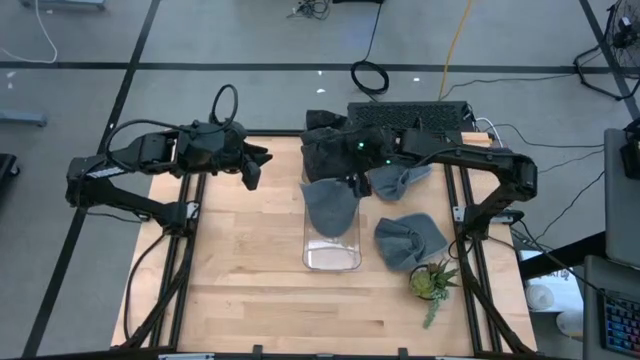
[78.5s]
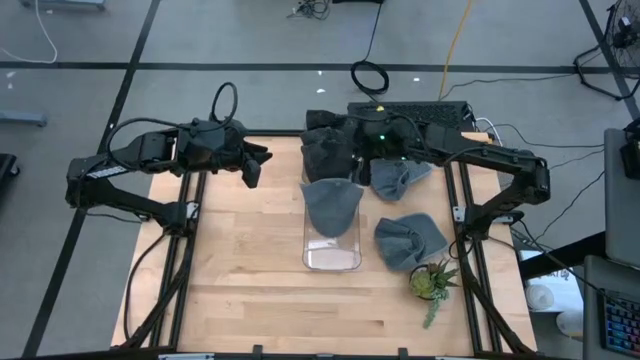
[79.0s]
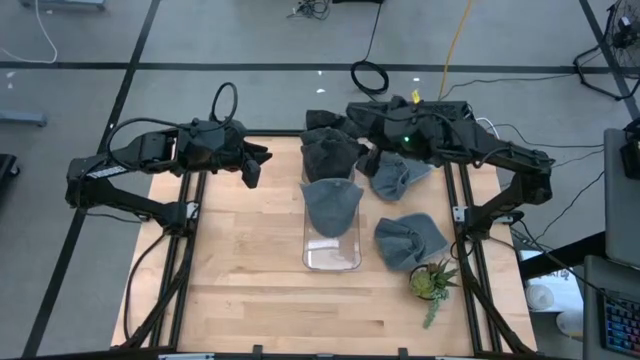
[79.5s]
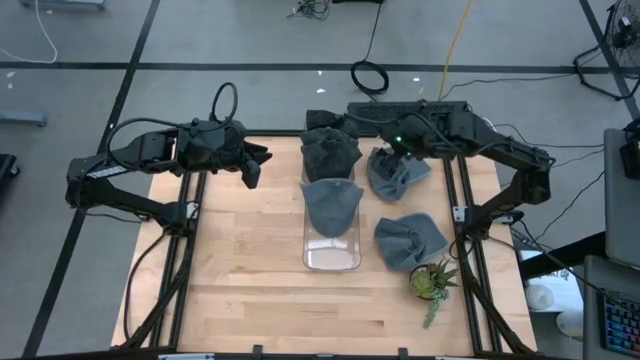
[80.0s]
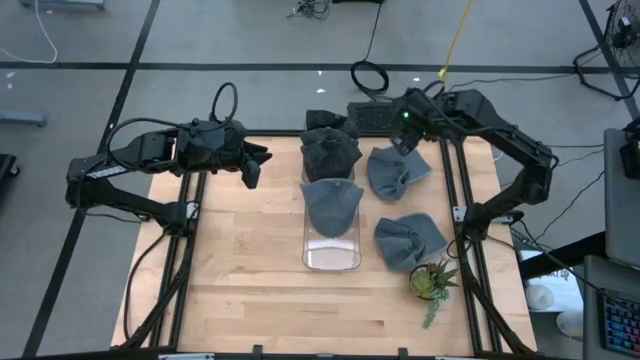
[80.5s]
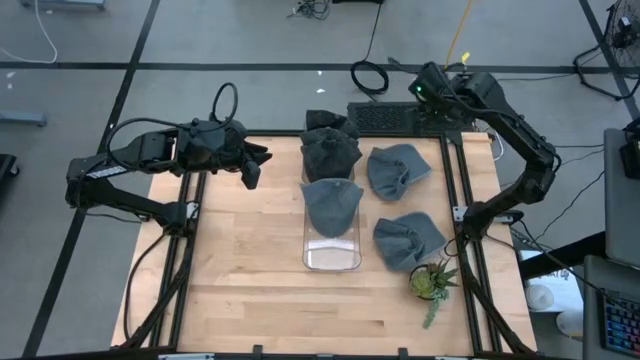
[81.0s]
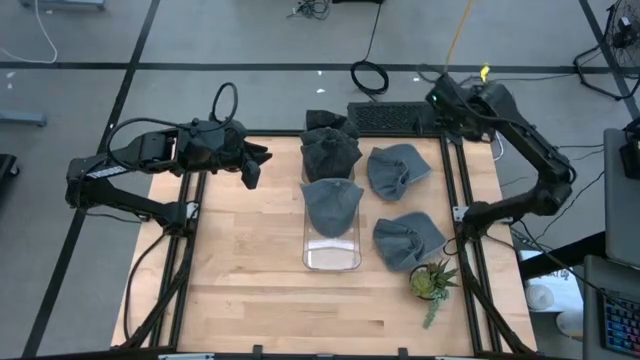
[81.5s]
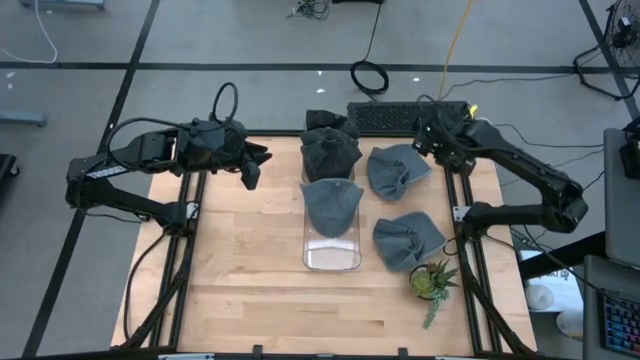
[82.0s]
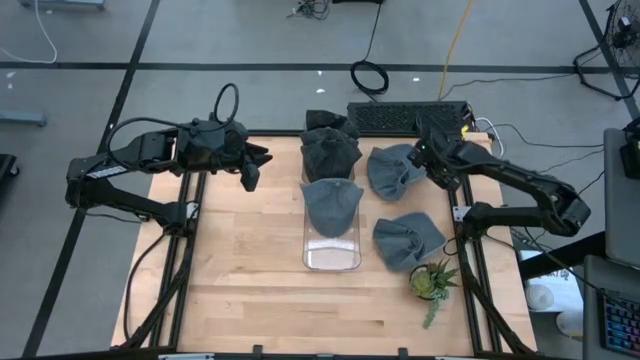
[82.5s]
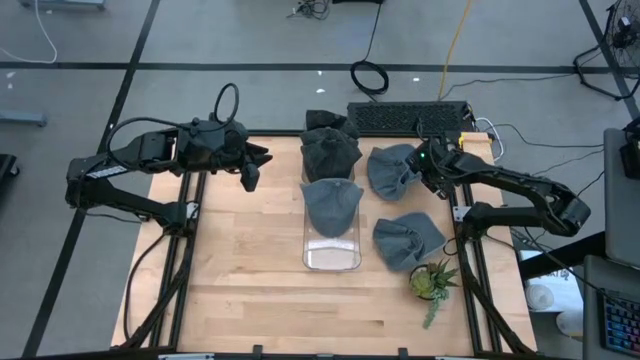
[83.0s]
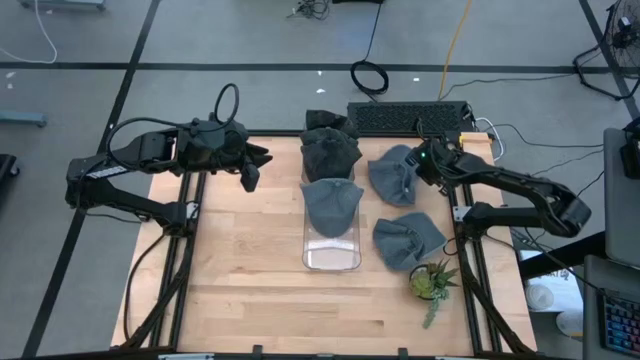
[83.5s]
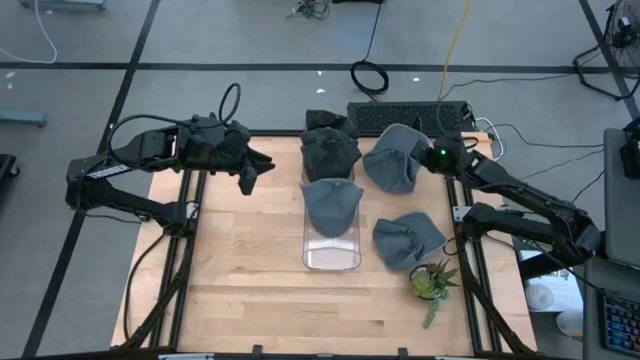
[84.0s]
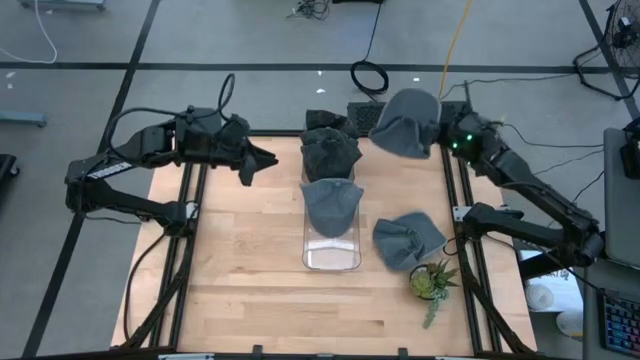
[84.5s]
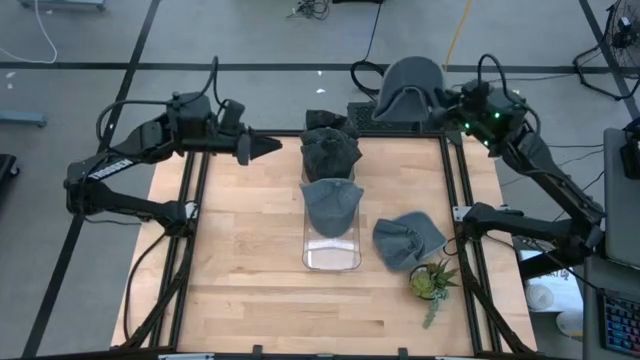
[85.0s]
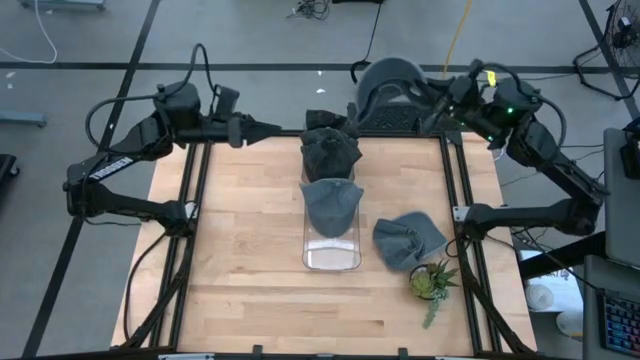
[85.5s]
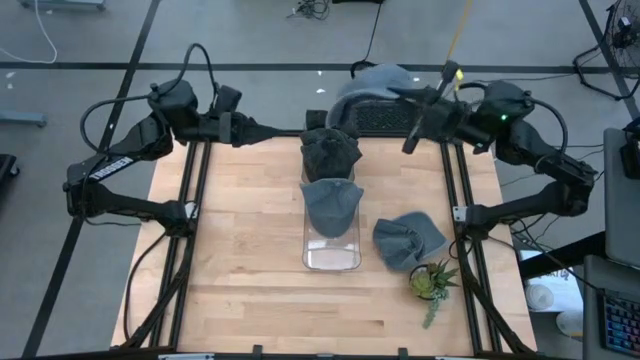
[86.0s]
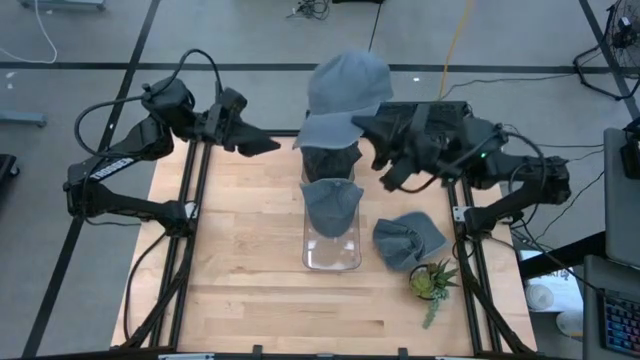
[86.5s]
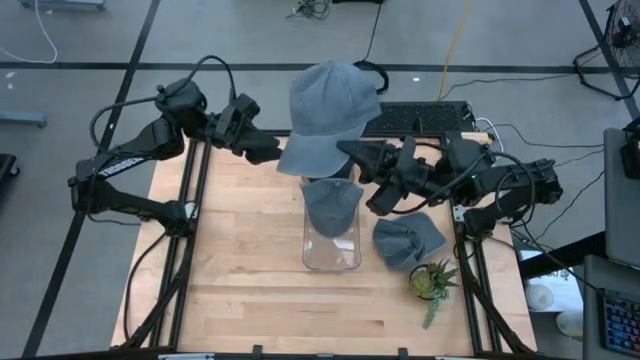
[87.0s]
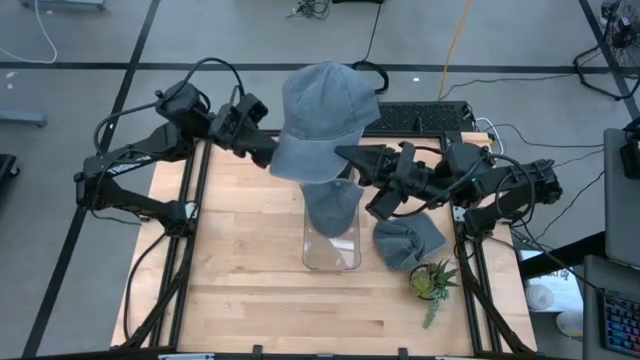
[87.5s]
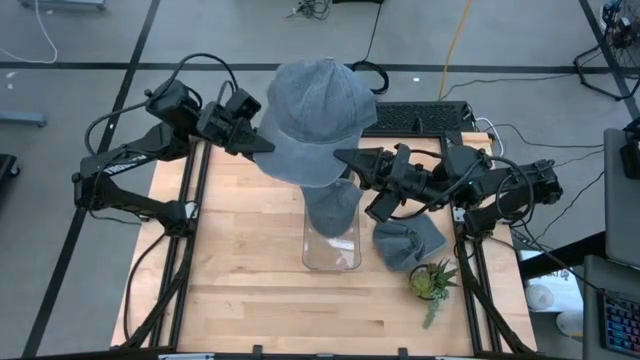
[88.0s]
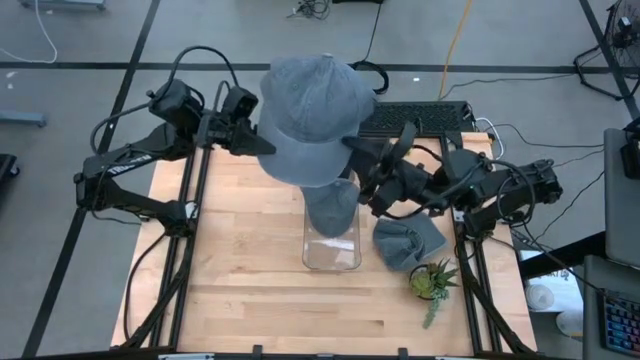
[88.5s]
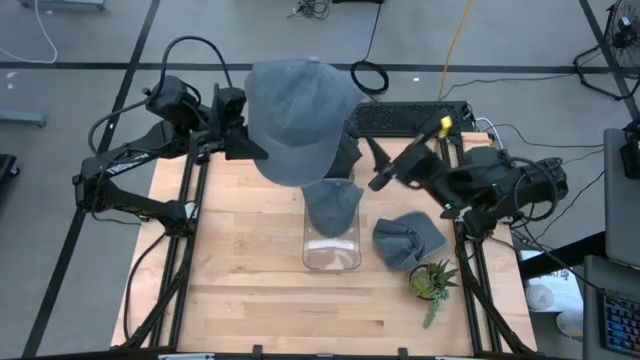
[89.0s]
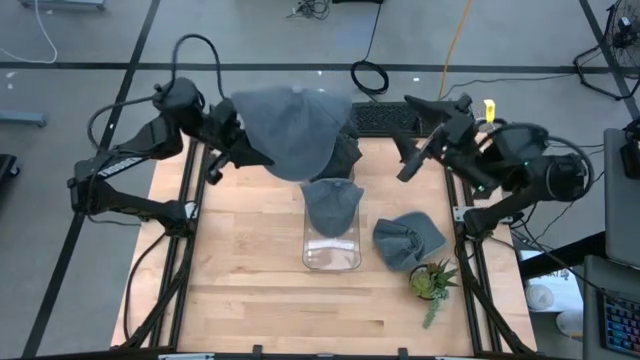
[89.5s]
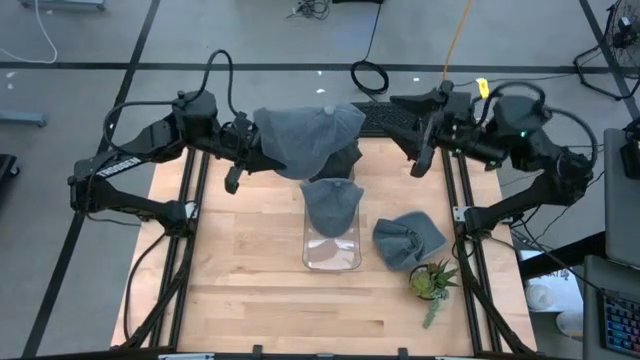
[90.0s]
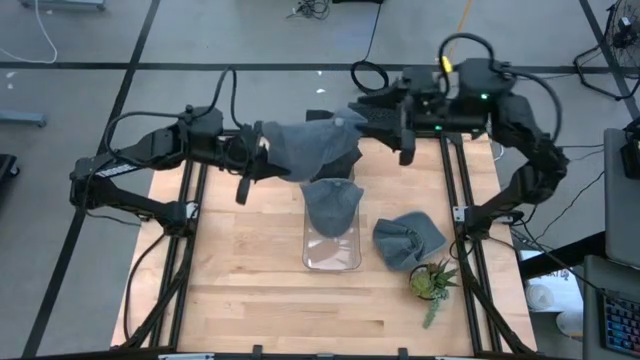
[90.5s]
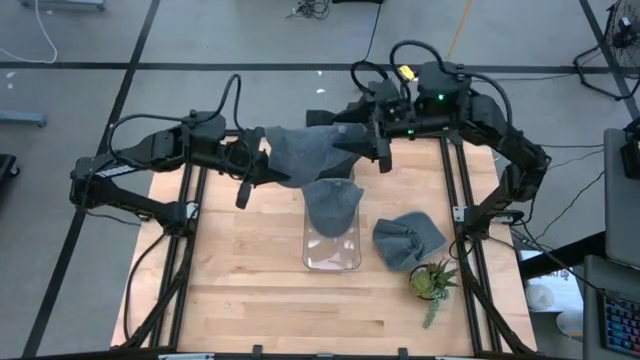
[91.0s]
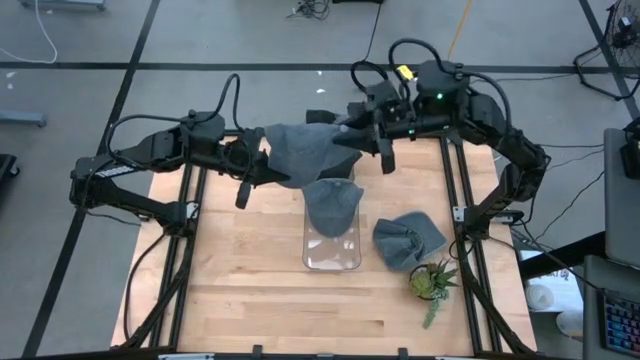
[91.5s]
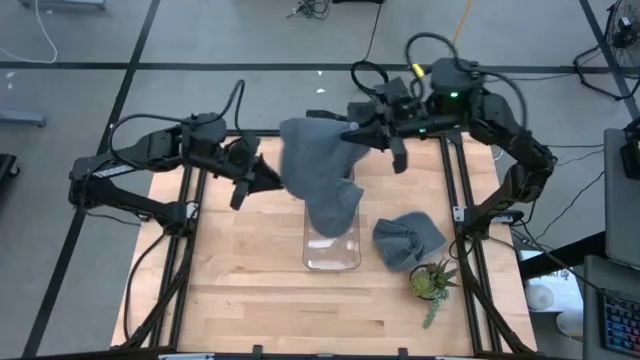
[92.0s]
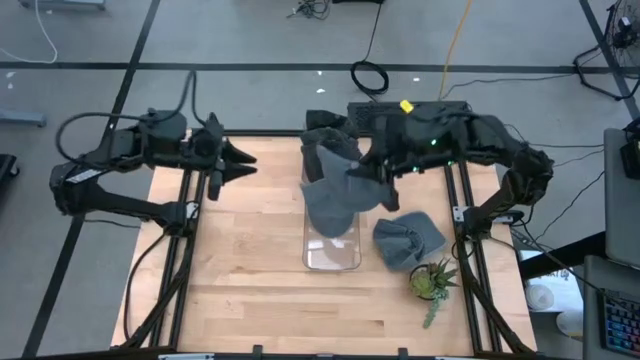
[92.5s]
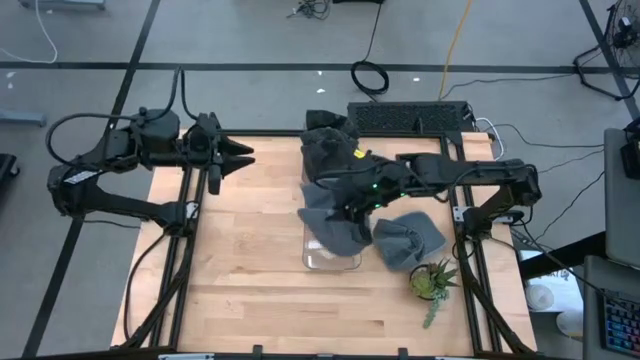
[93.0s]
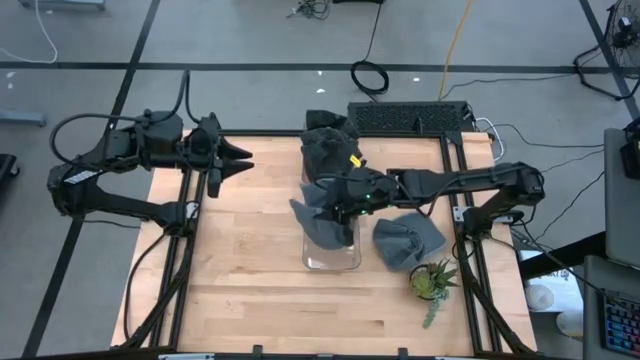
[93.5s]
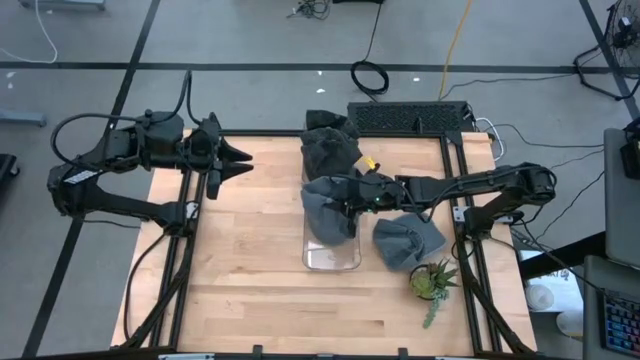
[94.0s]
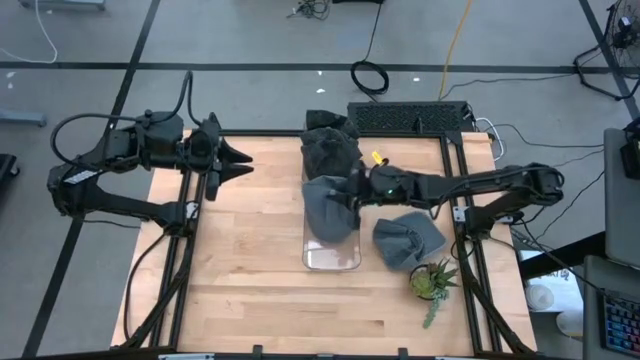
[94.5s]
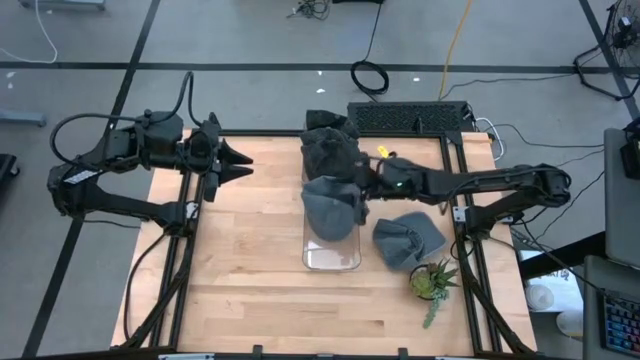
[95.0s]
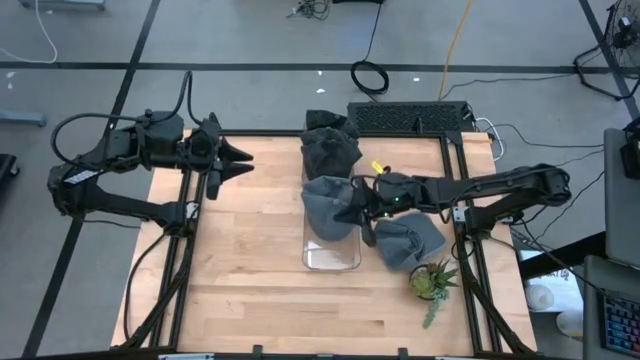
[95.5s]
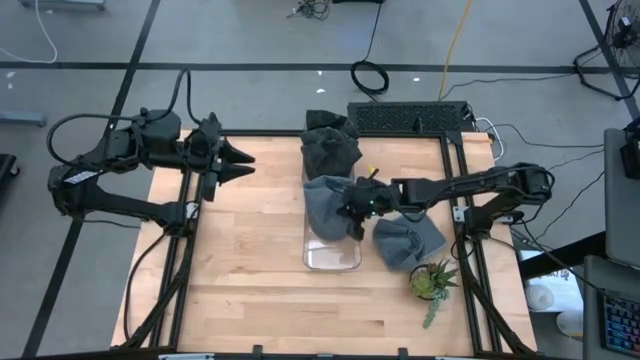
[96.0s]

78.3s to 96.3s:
Task: Pick & Place hat
Put the top blue cap into the bottom transparent bin
